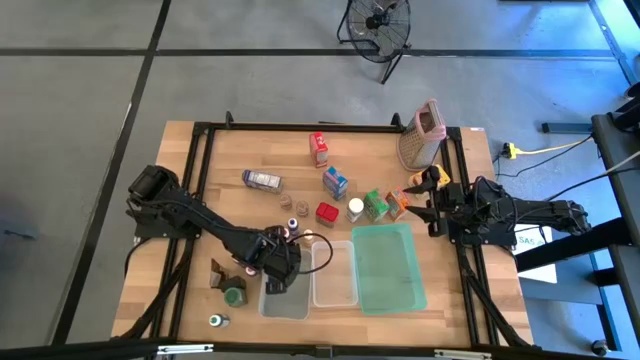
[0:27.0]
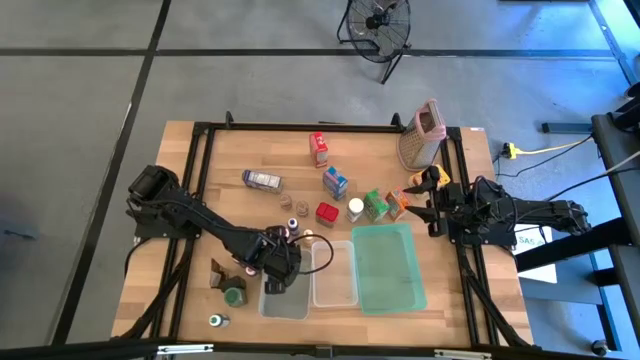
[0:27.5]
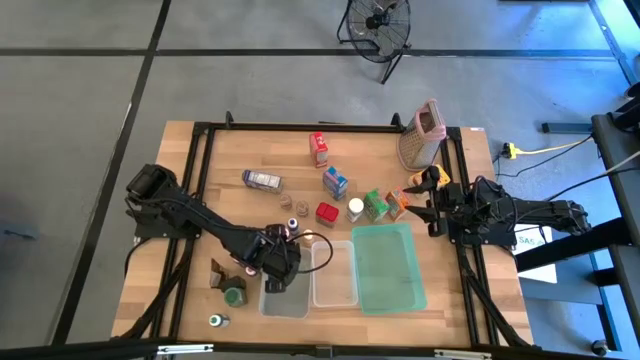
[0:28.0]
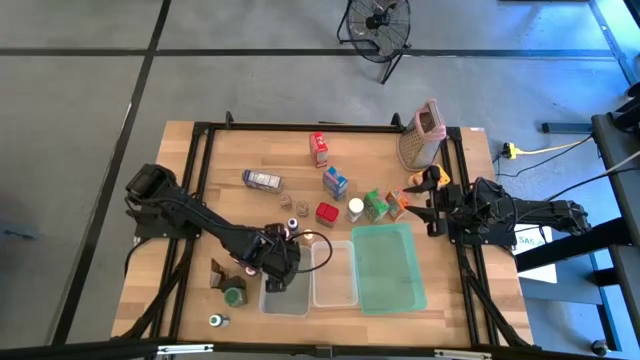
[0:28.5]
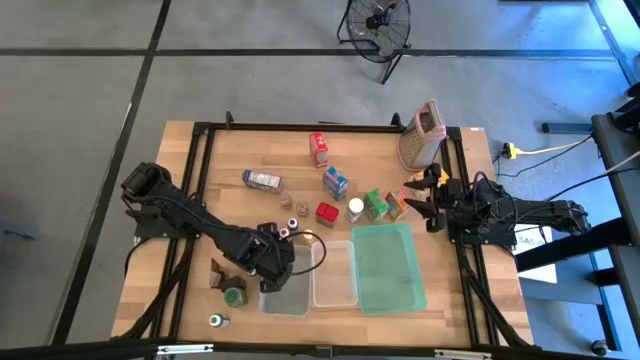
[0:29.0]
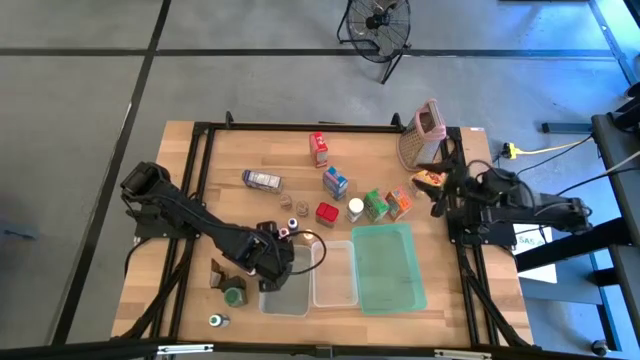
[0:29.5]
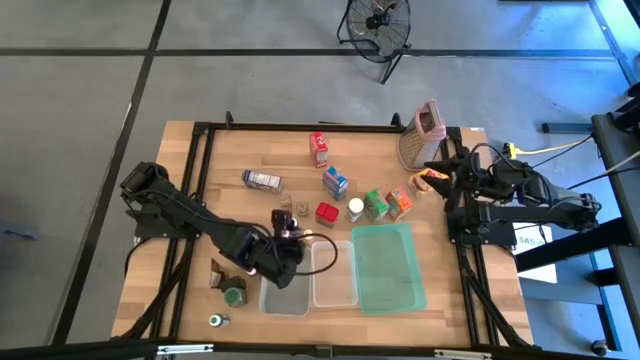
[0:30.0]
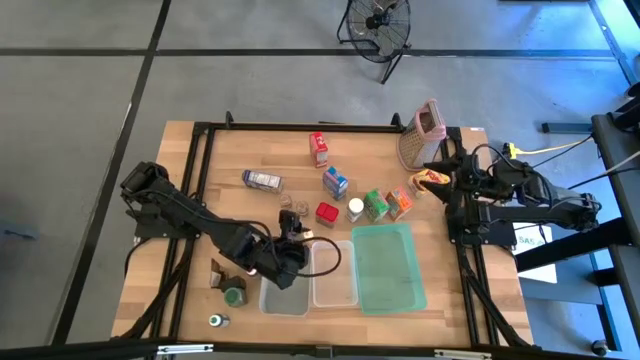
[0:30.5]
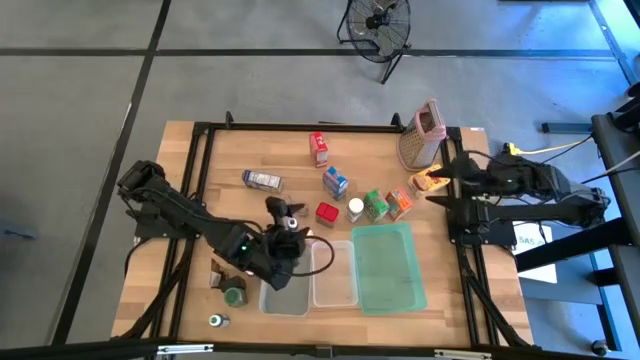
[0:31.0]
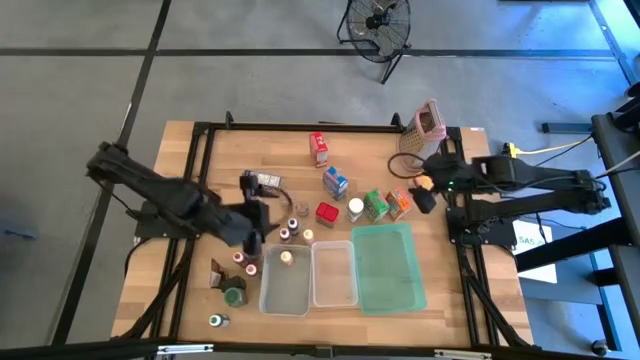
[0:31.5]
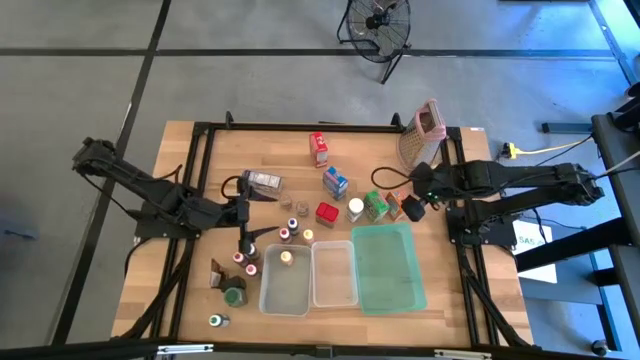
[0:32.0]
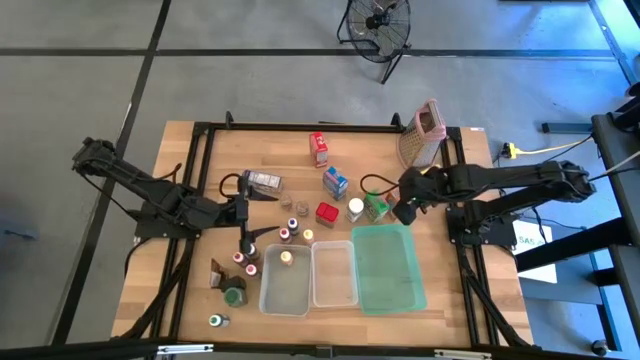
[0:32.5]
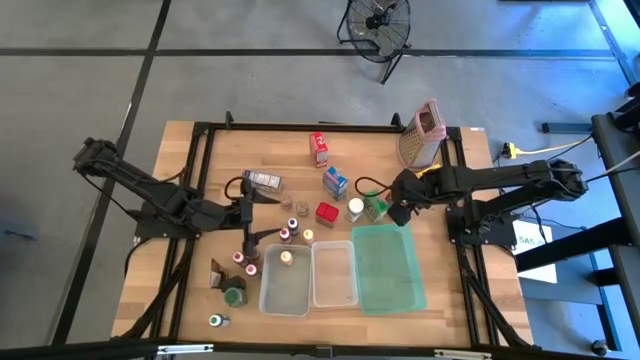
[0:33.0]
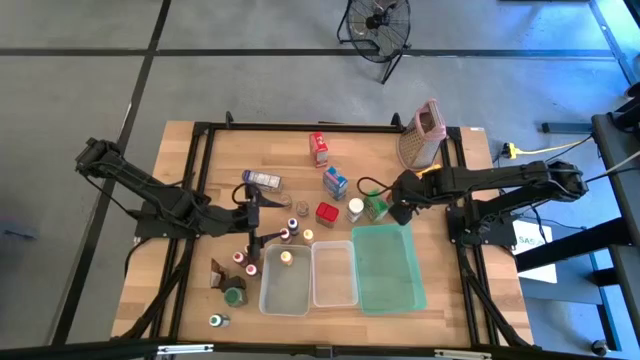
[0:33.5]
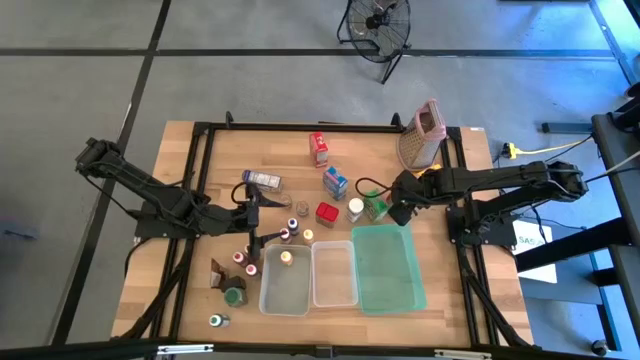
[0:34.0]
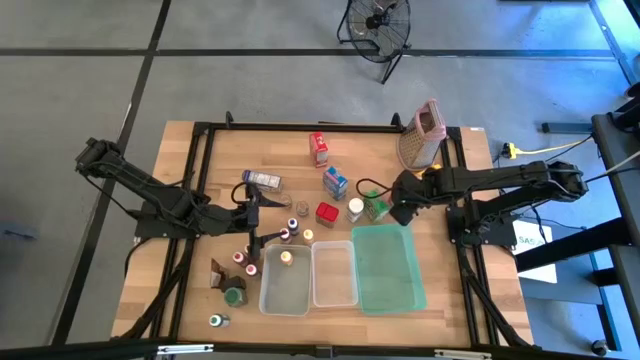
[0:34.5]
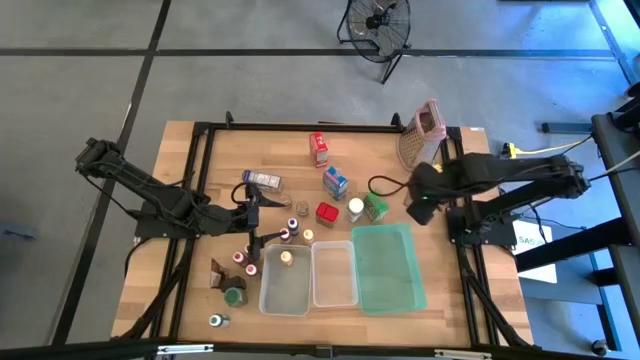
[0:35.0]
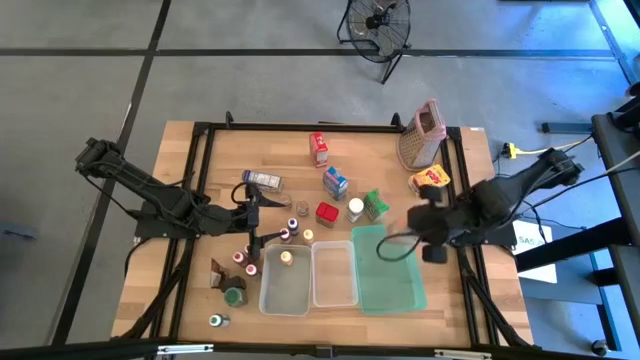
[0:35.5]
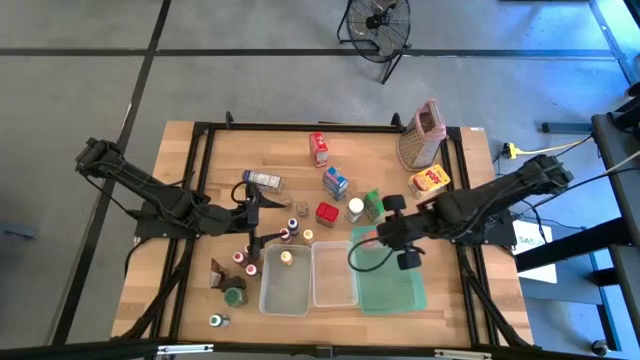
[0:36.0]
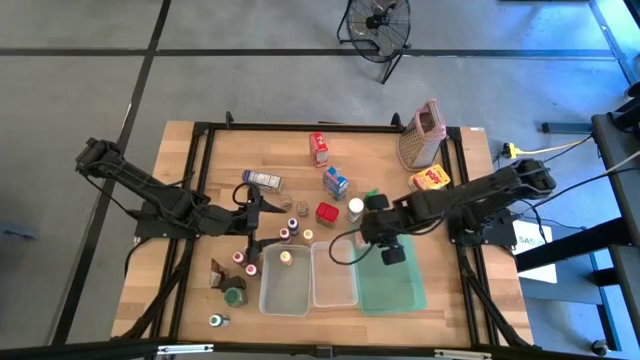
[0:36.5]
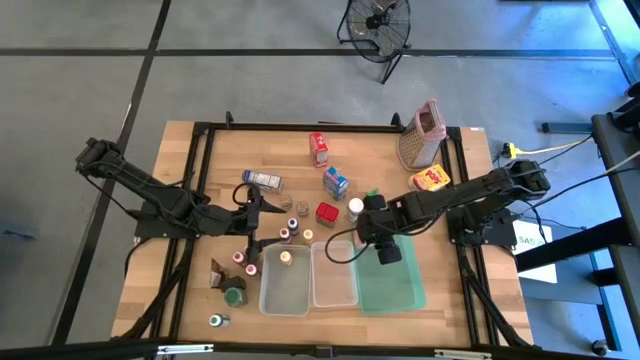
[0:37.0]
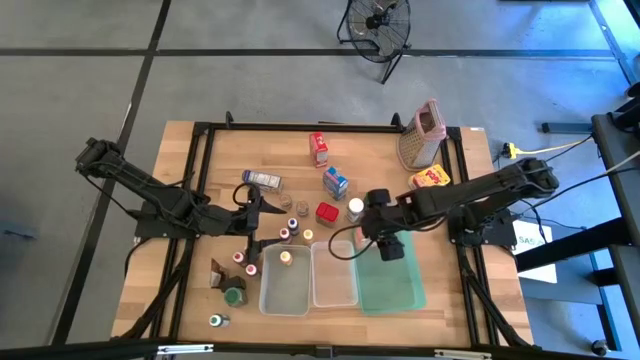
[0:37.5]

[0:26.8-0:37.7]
Task: Pick & Place Kitchen Items
Put the orange cereal box into the blue bin

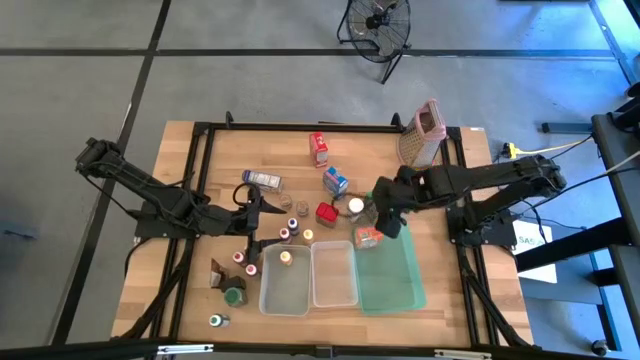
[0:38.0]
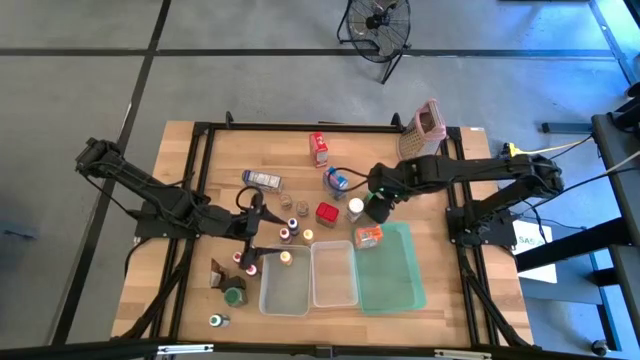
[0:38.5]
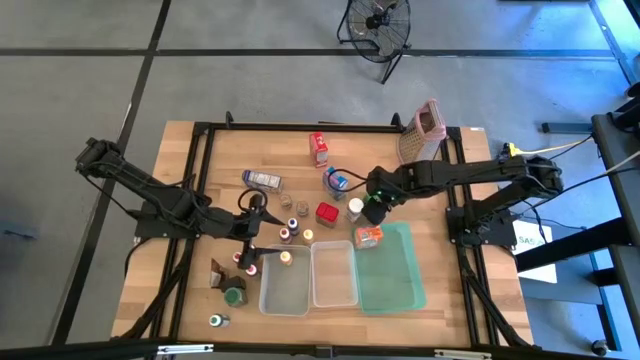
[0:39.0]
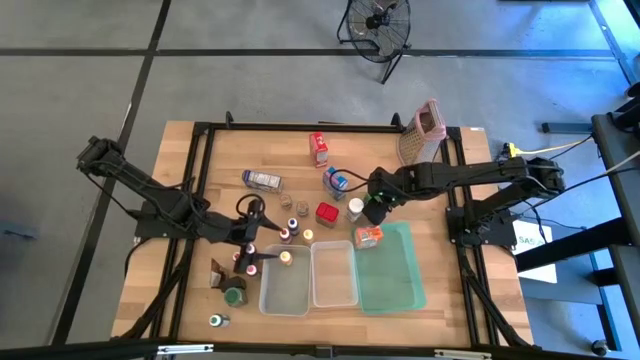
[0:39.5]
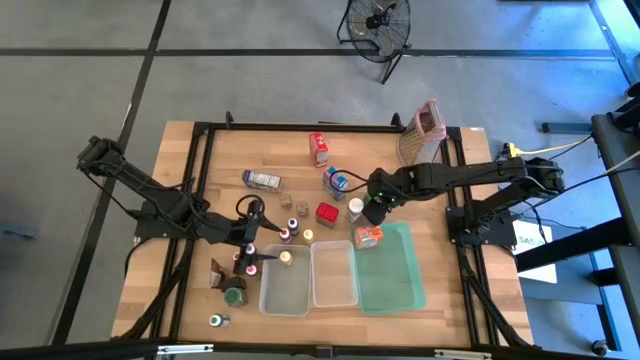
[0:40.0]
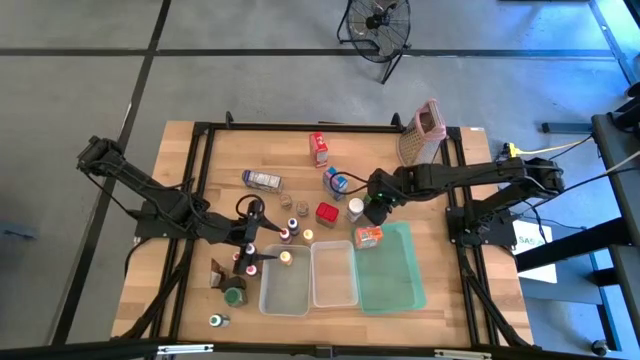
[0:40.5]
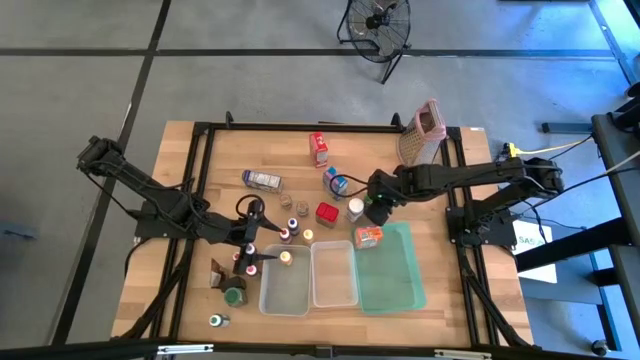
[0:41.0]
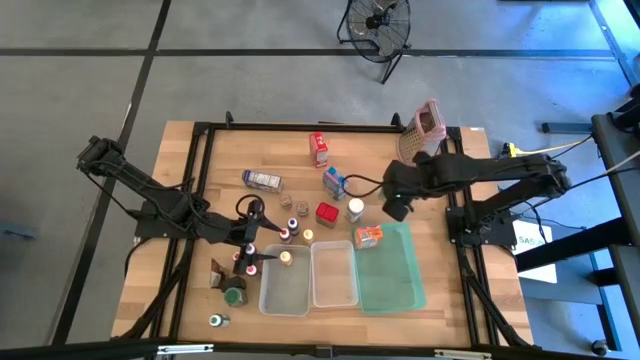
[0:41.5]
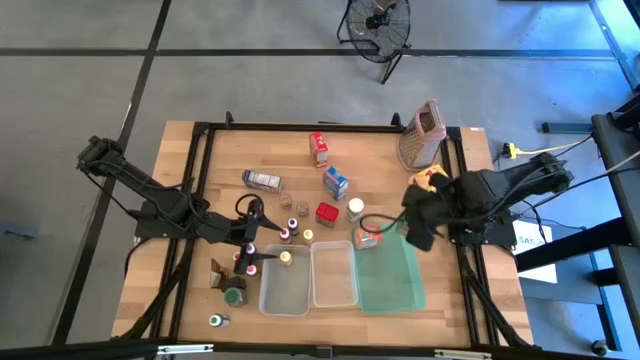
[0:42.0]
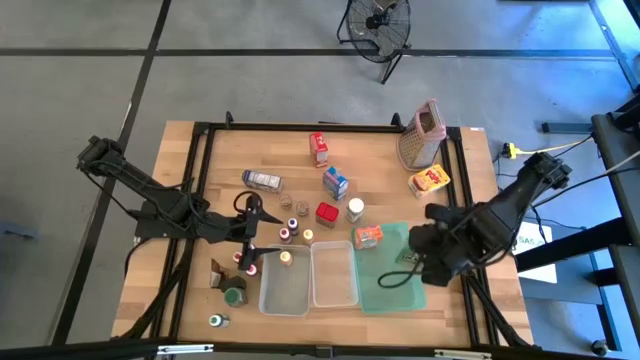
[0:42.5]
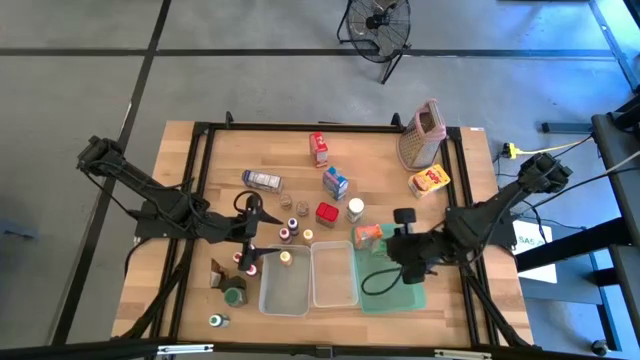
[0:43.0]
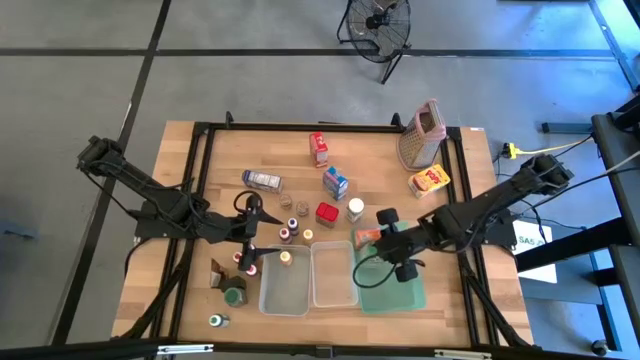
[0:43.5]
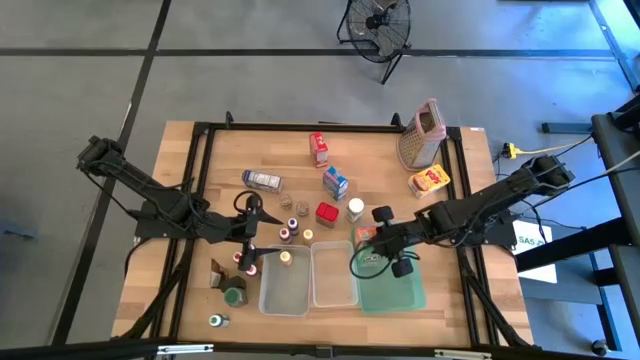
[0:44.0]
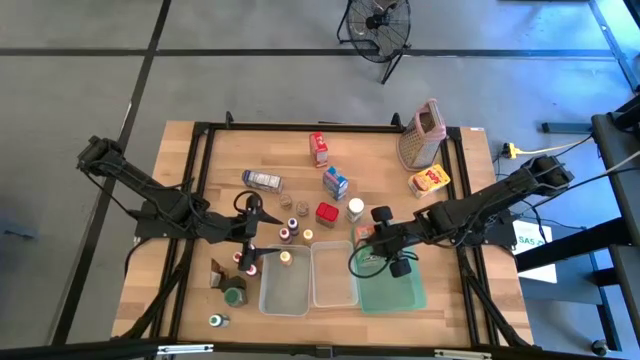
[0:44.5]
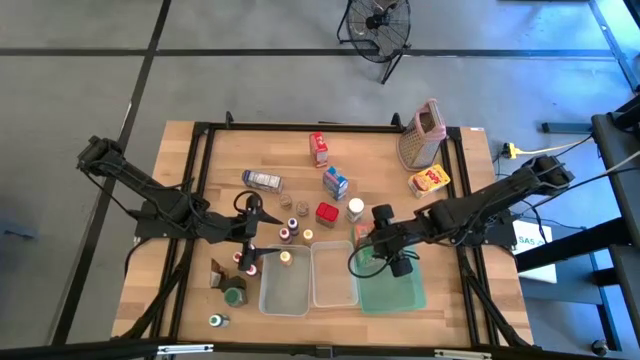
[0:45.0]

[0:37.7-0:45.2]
Put the green cereal box into the blue bin

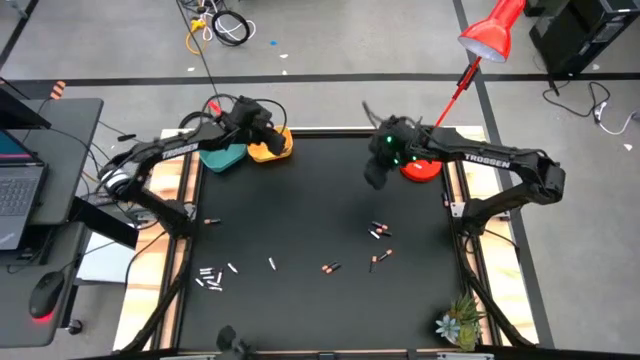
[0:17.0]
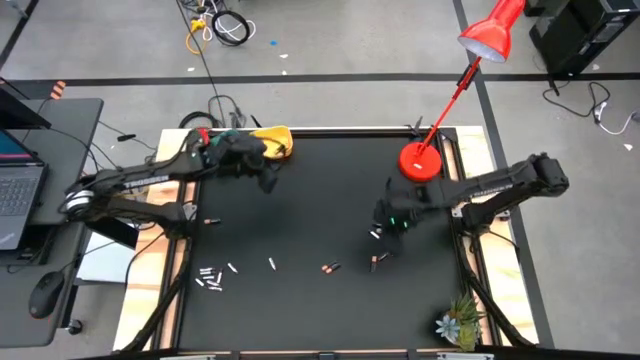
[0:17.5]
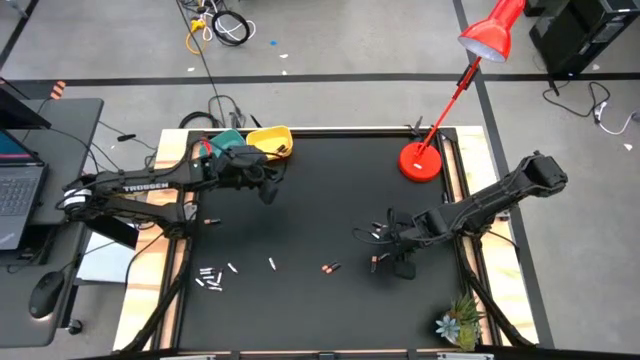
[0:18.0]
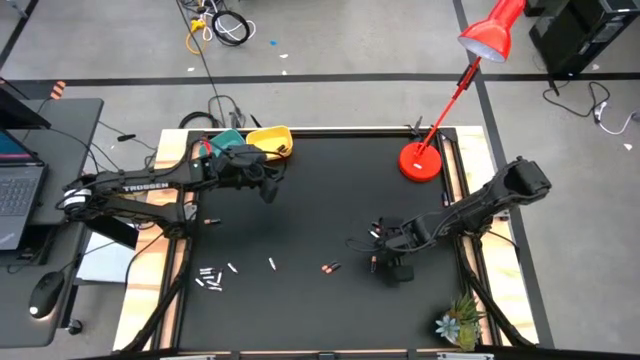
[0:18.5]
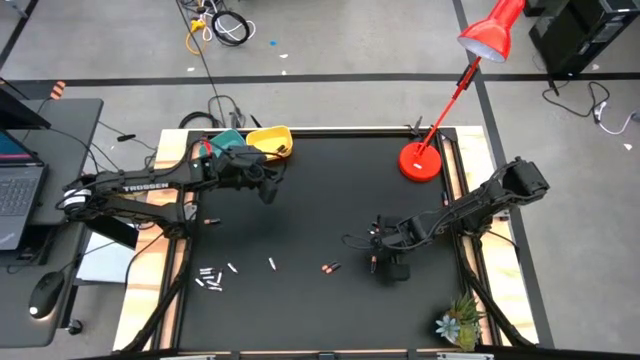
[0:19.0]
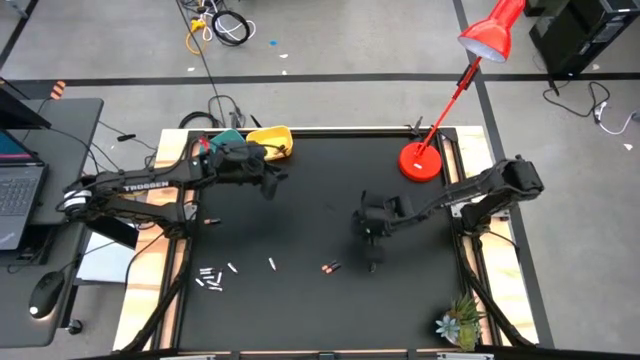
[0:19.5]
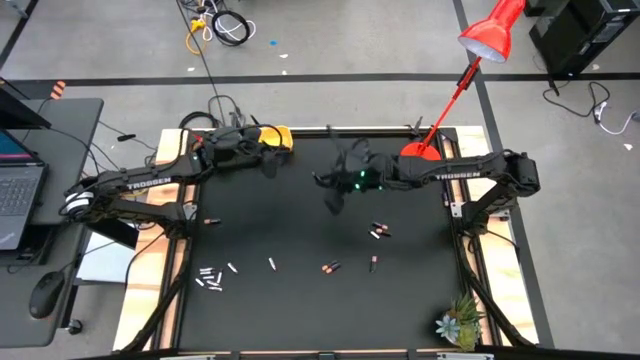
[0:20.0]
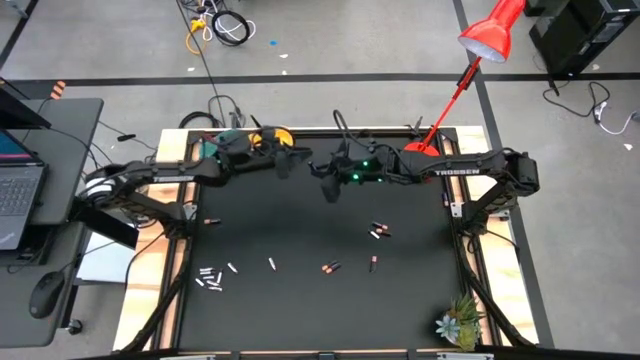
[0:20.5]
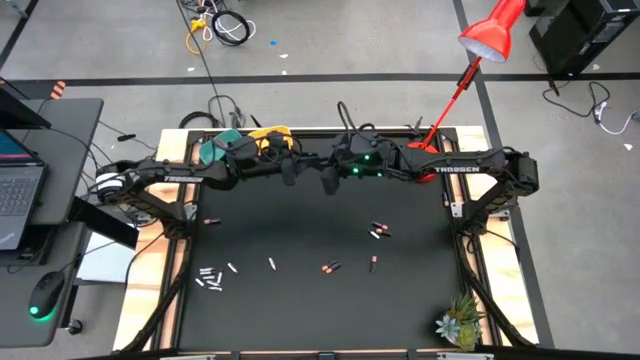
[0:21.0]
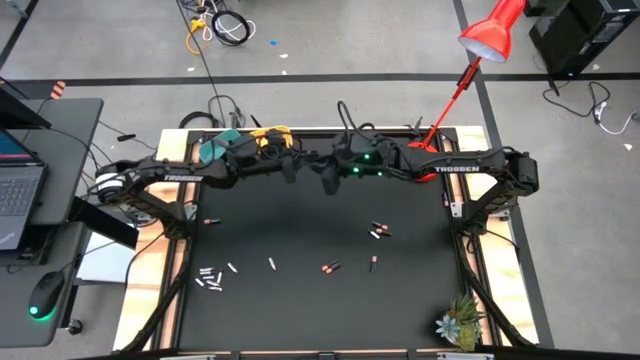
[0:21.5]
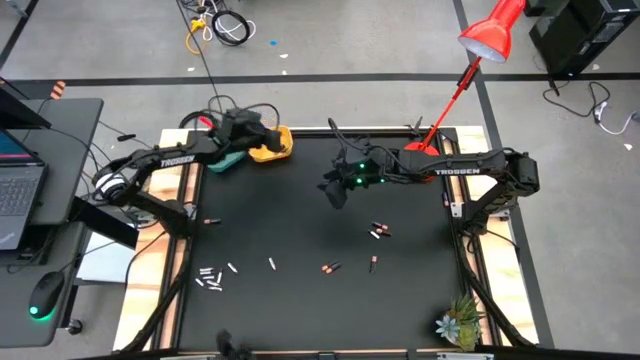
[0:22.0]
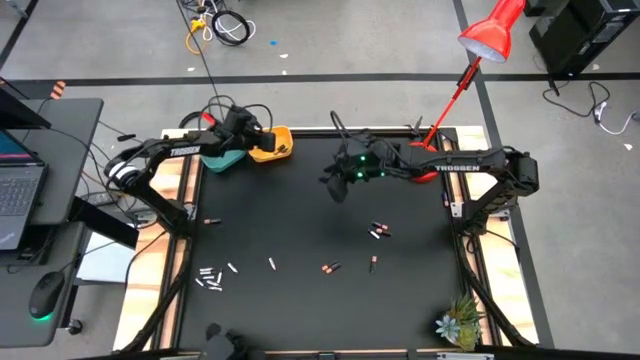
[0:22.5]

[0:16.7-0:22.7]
Task: Sort batteries
Put the black battery into the yellow bin
